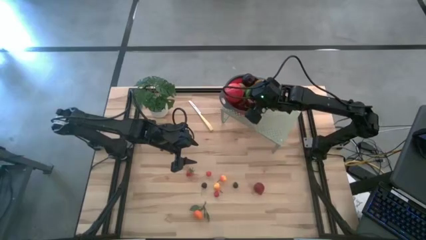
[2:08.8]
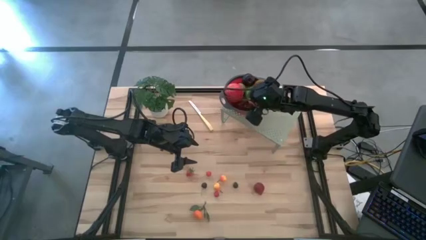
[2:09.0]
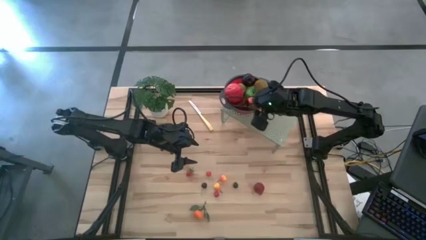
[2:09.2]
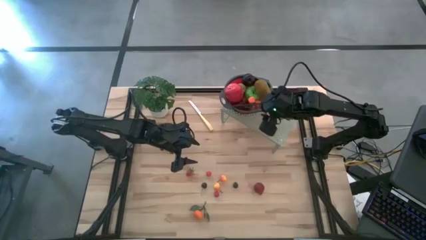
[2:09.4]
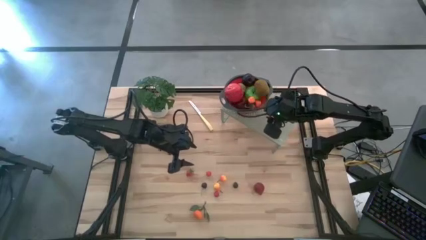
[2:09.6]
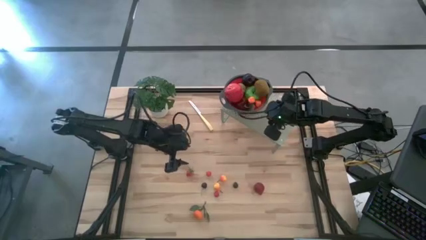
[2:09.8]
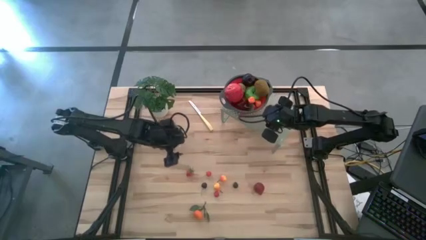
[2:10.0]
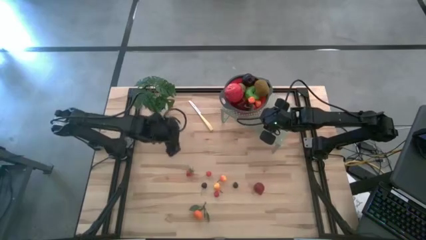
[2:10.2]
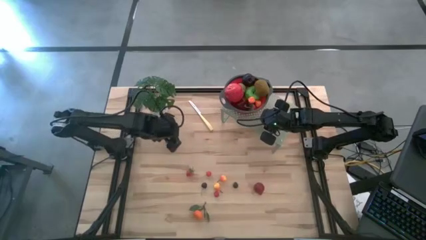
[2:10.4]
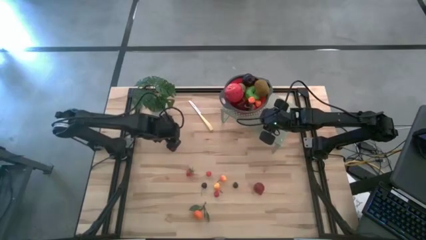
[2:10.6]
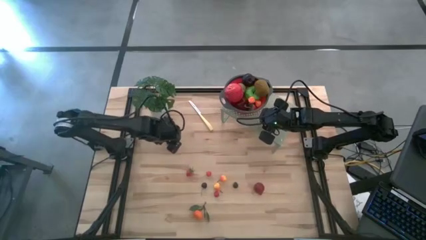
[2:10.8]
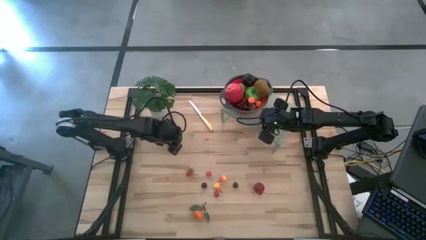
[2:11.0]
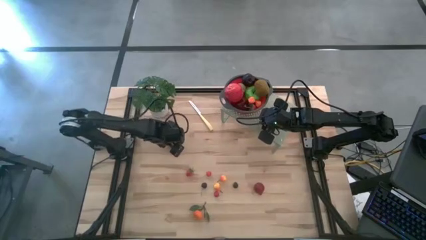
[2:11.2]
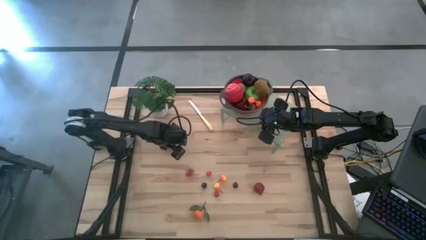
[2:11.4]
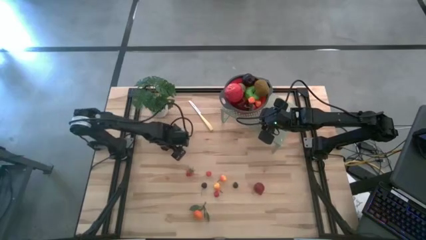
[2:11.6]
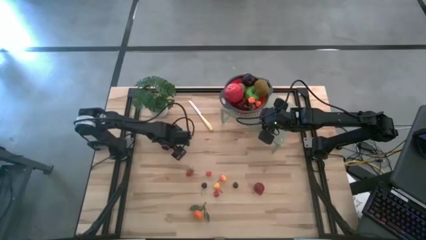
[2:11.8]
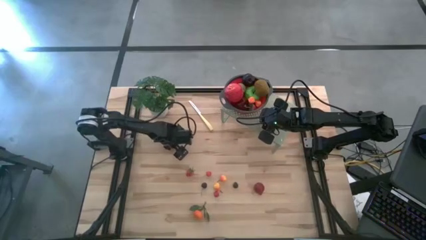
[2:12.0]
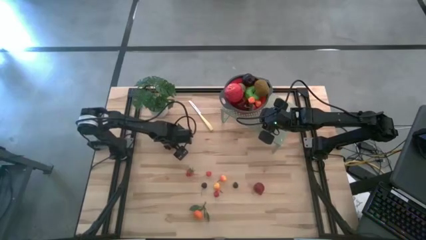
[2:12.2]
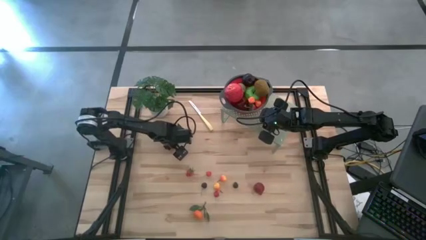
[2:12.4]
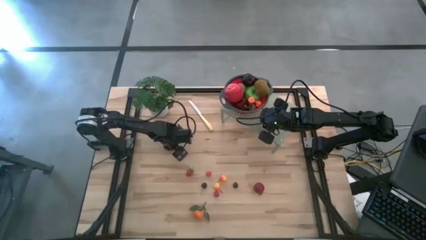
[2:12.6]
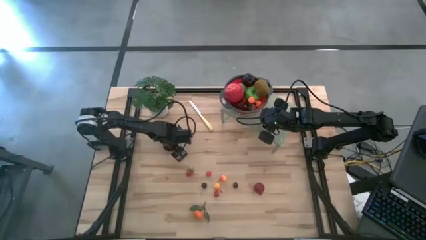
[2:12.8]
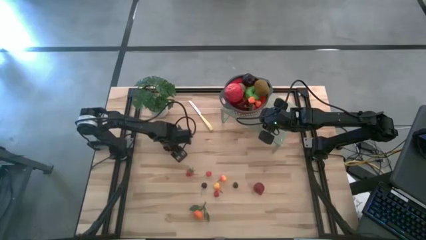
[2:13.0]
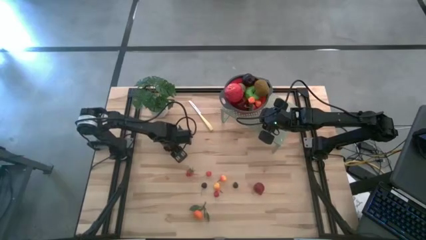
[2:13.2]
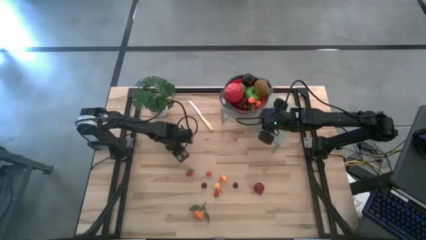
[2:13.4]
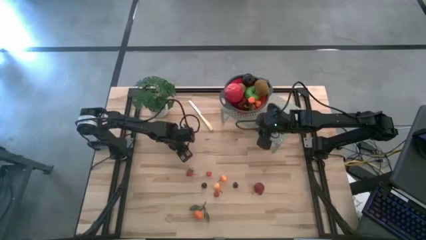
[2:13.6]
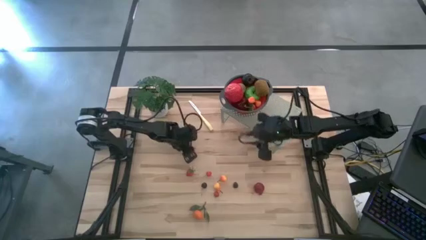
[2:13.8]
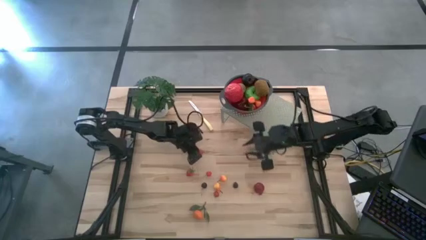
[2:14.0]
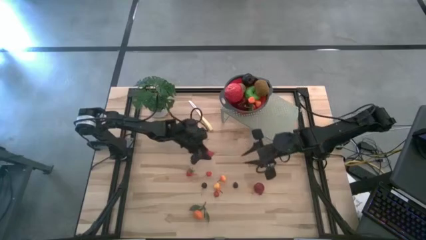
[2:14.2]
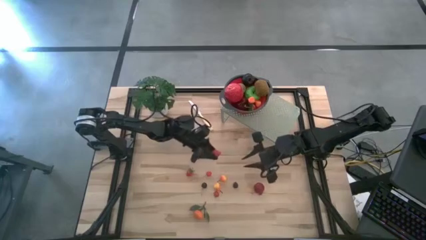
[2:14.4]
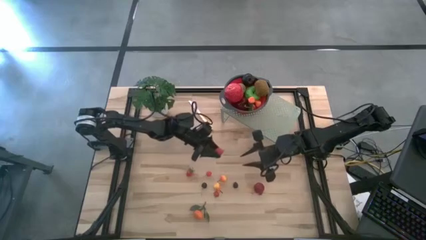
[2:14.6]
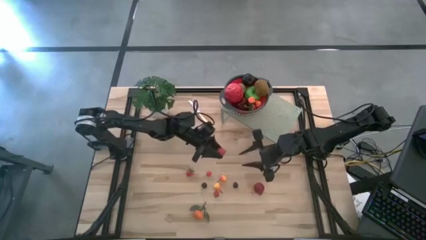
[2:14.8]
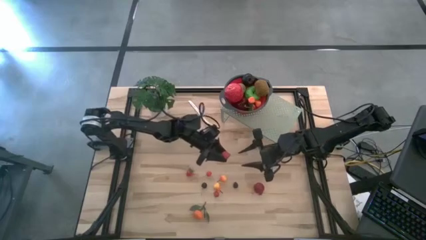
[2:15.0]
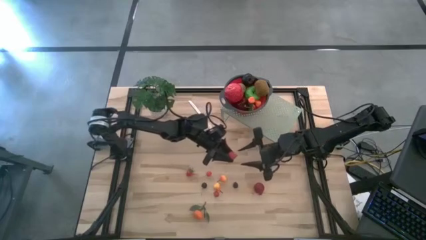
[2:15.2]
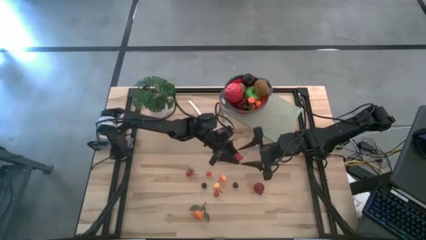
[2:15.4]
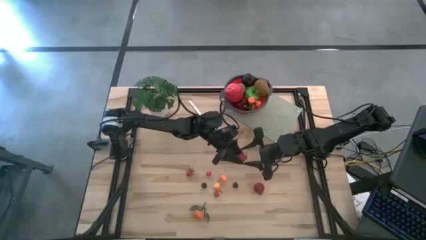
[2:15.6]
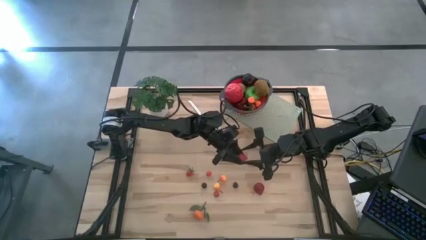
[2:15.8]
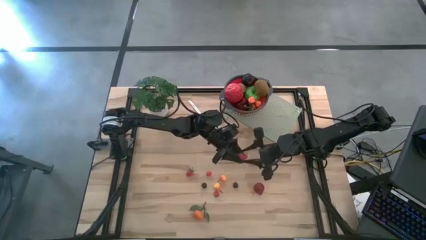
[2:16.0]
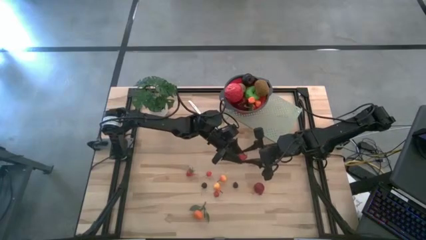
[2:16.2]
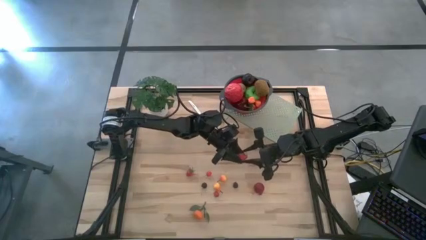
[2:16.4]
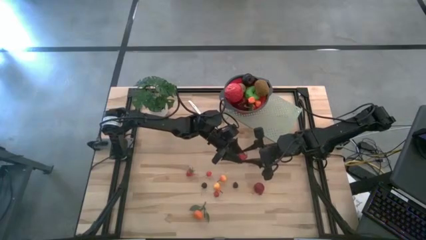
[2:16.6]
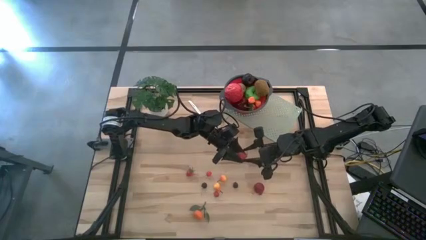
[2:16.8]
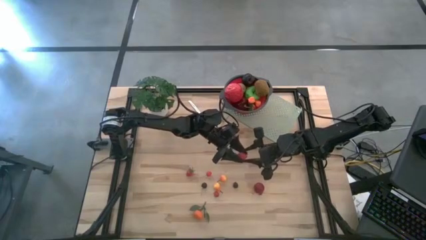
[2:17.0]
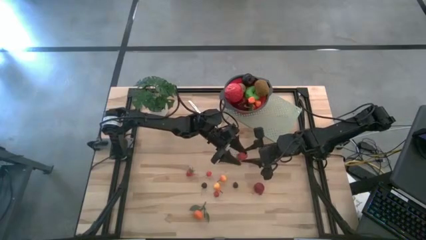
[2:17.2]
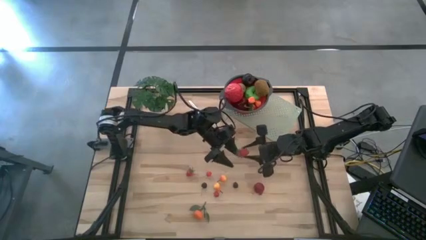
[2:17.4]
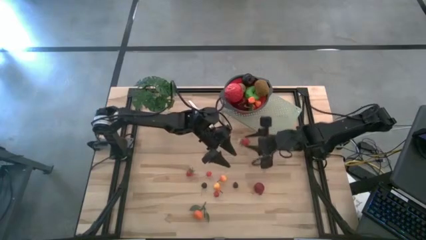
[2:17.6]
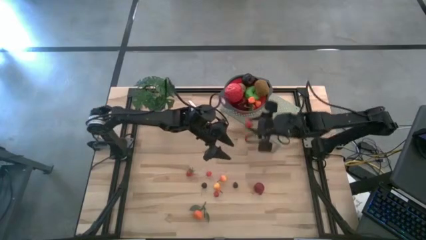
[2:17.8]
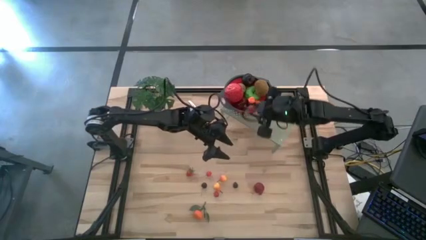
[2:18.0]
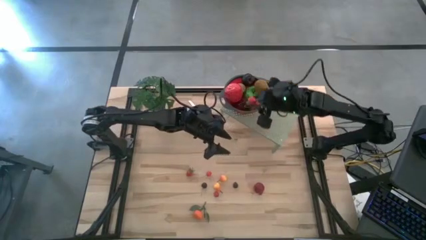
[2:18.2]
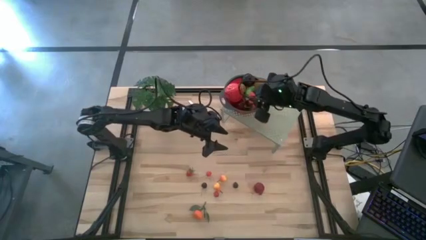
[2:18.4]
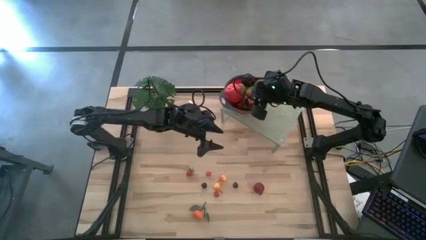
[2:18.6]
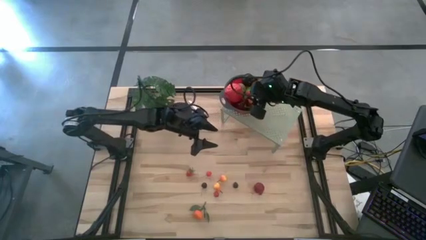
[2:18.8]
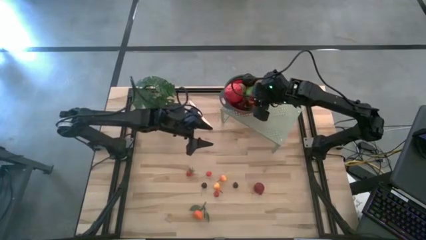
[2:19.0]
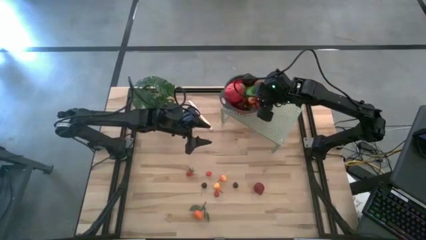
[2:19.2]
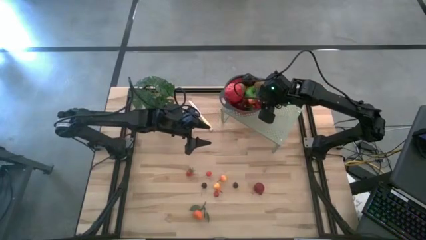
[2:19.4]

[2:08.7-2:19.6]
Task: Pick & Place Fruit
Put the strawberry into the red gray colander on the shelf

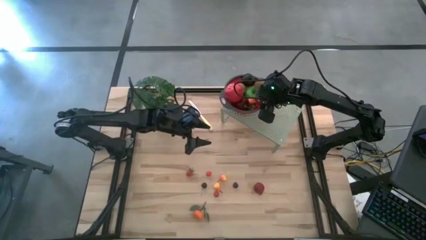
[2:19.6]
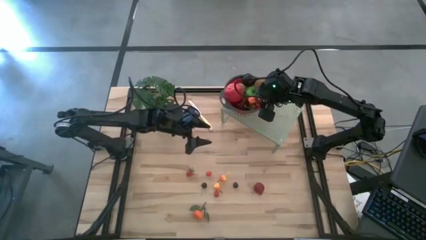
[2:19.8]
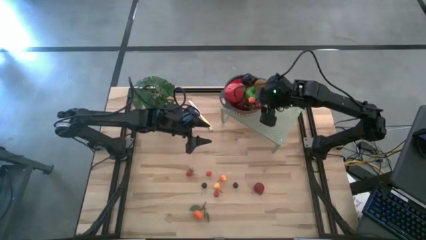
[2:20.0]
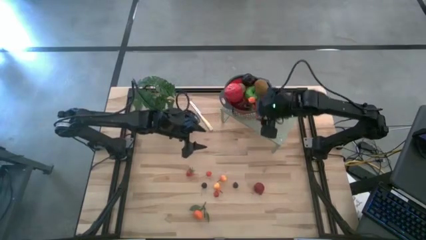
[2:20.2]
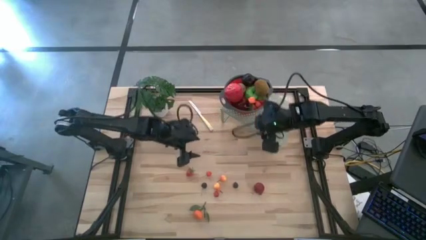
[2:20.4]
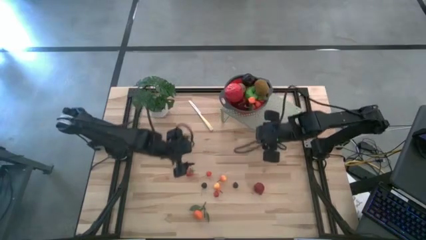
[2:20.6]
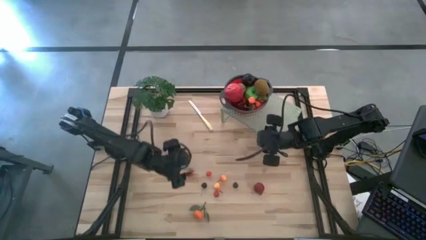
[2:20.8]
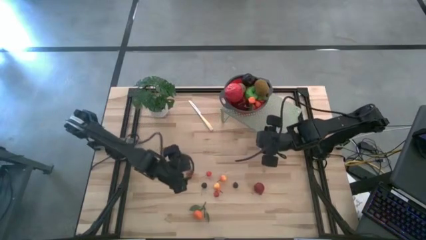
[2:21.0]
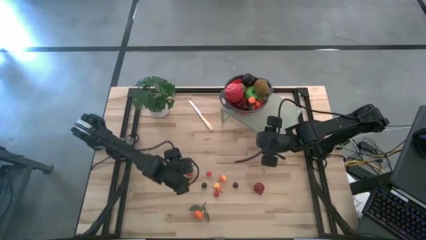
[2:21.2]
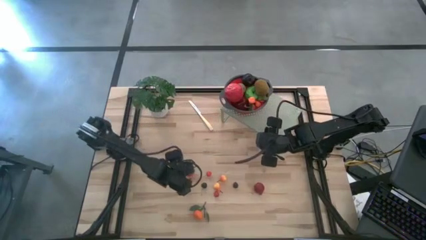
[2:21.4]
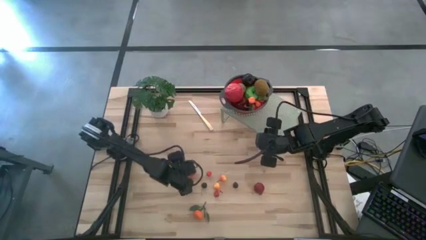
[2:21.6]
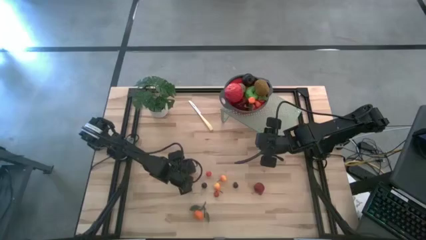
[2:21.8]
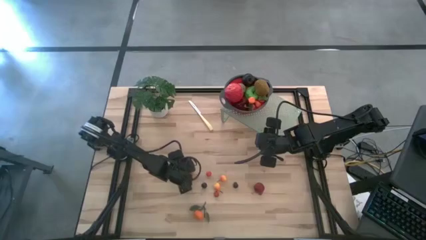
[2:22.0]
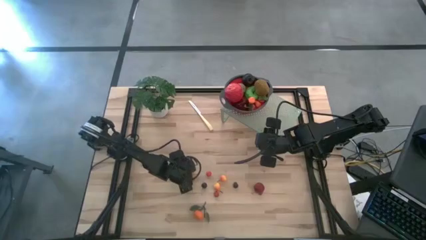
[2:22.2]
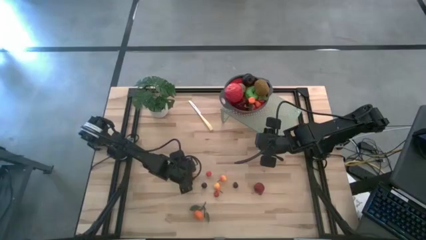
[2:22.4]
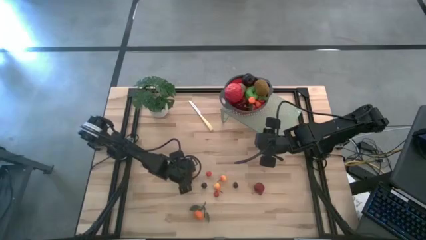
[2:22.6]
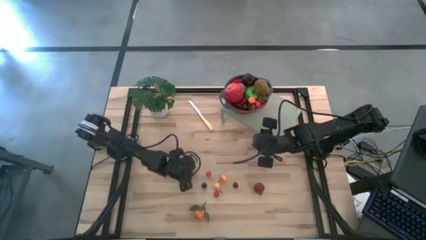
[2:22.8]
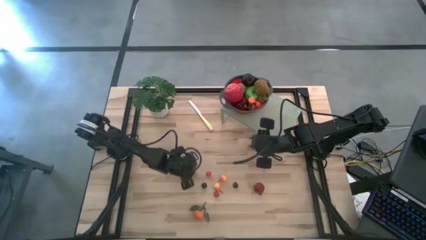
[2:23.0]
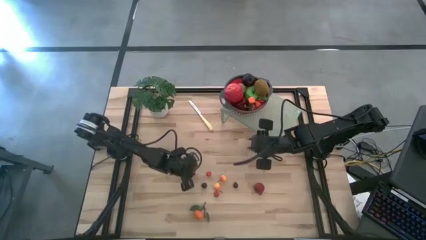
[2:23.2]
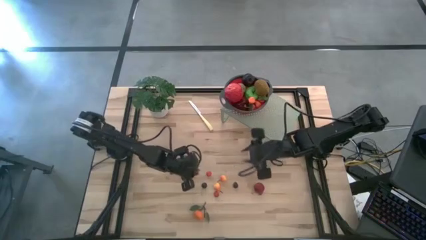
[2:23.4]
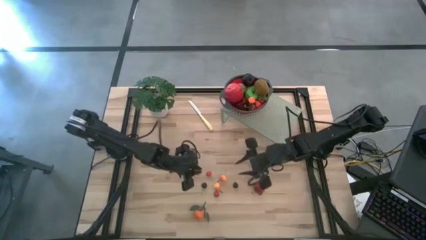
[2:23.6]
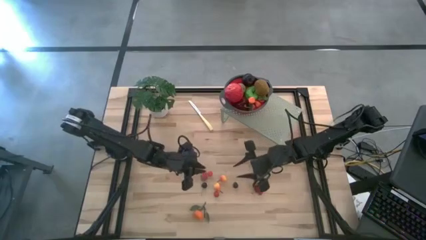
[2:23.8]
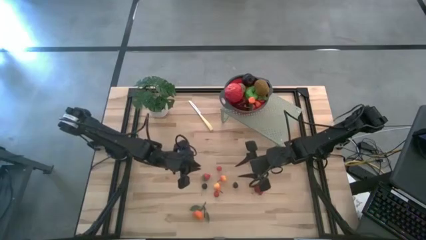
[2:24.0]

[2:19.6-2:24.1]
Put the strawberry into the red gray colander on the shelf

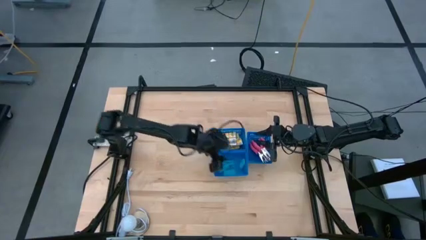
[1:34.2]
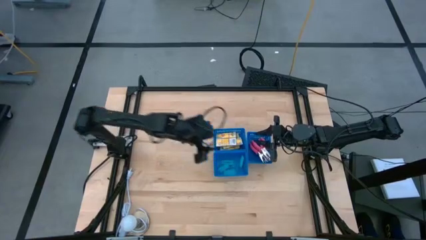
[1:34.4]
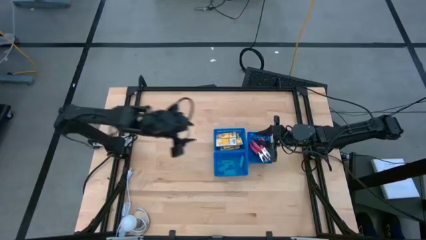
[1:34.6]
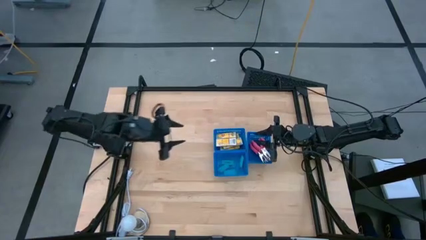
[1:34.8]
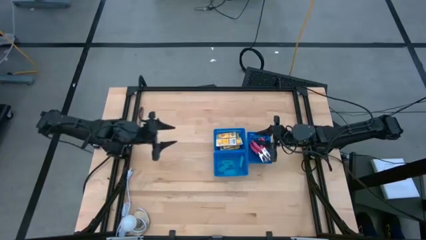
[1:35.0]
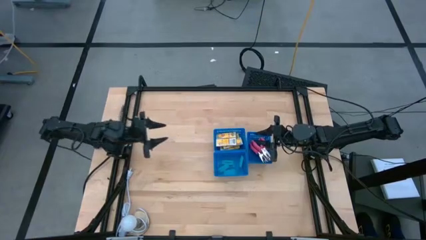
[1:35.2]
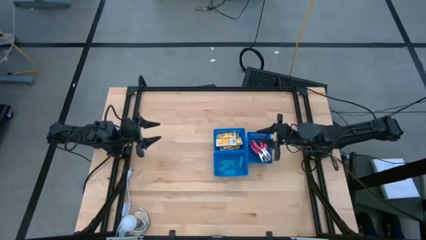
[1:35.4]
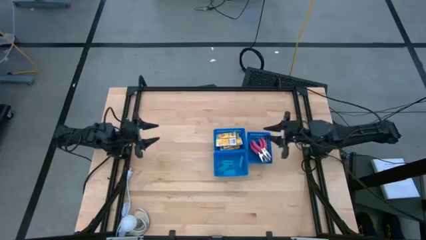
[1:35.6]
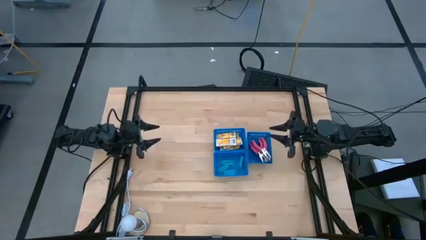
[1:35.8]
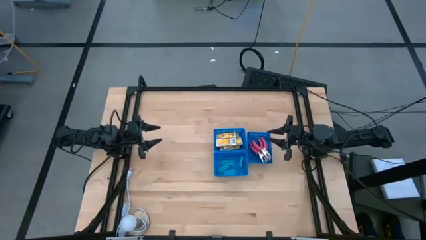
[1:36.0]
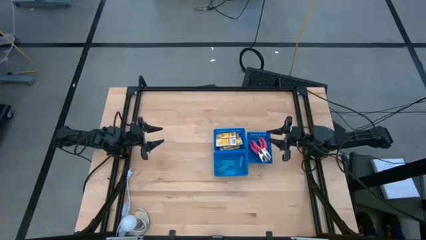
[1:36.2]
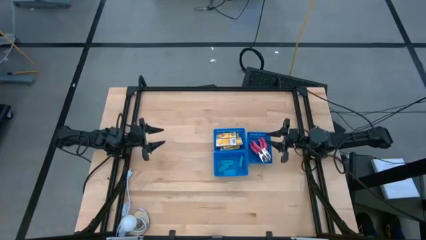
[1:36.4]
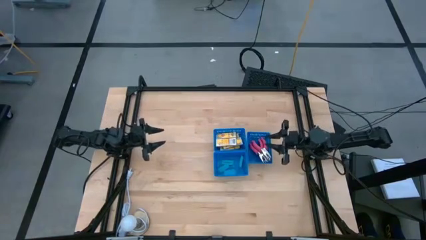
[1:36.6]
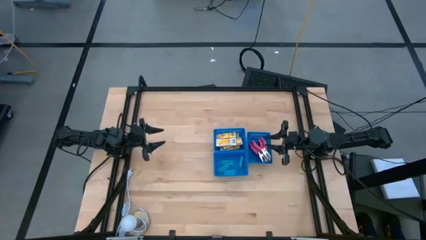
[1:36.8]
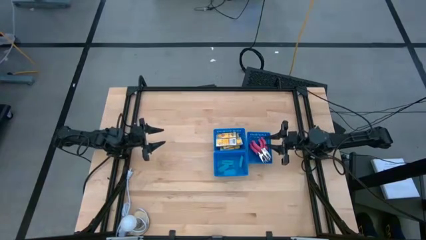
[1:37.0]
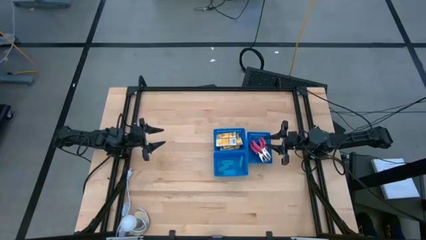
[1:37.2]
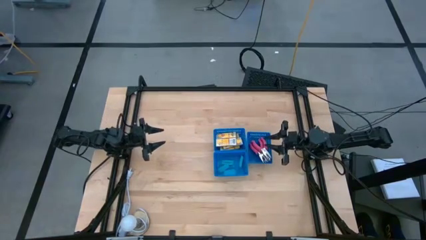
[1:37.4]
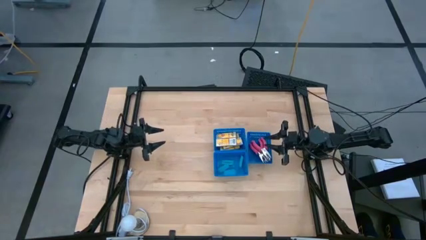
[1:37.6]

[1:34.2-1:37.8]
Task: Pick & Place School Supplies
Return to home position
